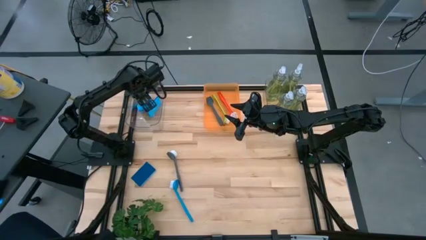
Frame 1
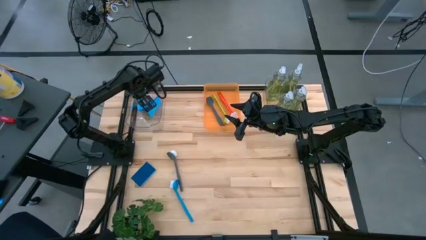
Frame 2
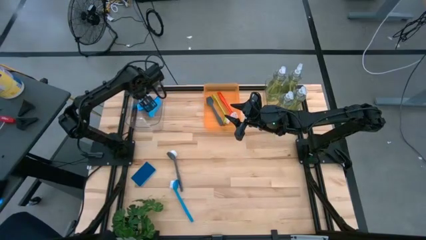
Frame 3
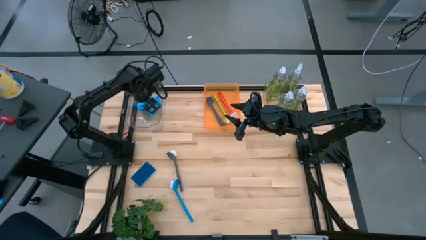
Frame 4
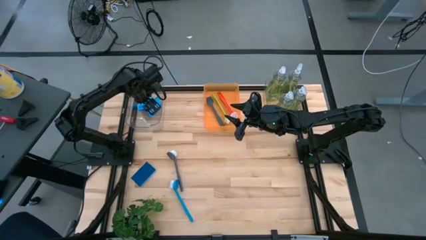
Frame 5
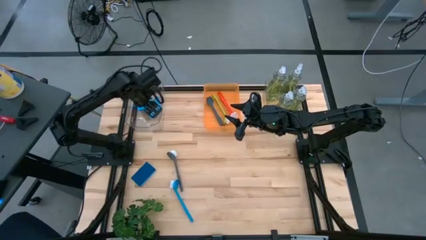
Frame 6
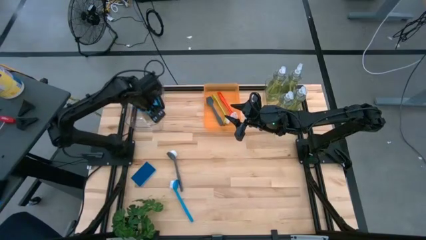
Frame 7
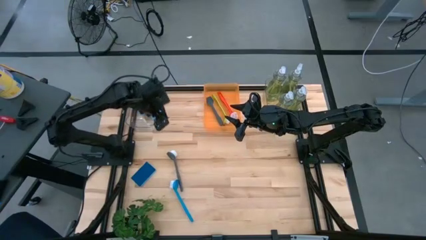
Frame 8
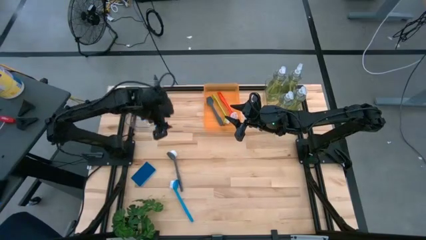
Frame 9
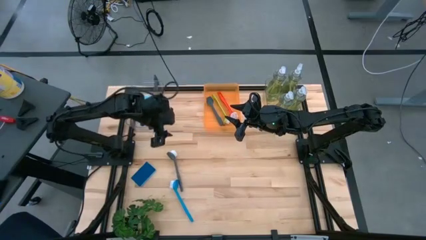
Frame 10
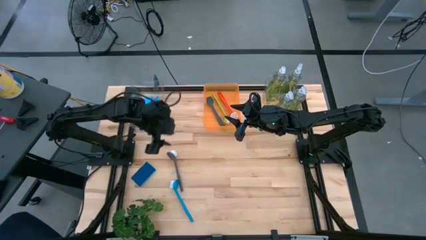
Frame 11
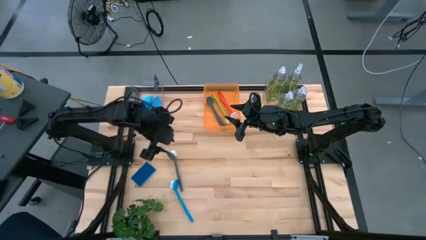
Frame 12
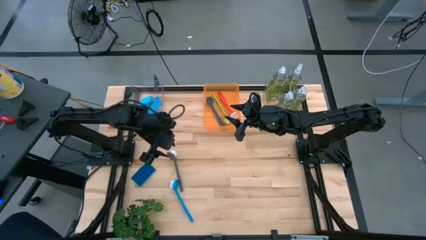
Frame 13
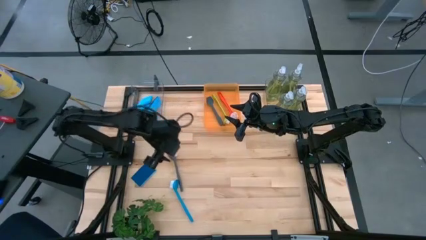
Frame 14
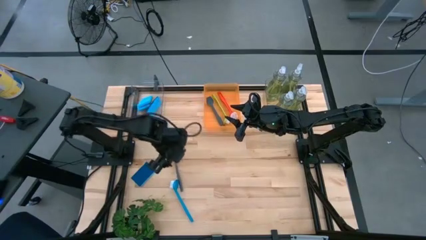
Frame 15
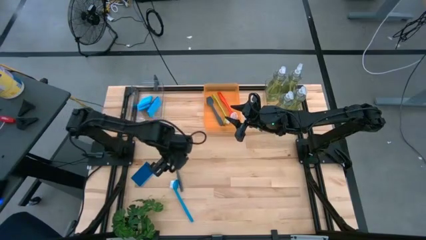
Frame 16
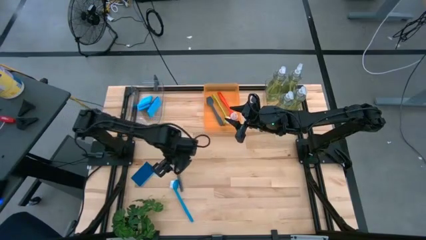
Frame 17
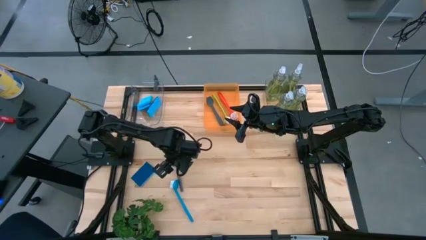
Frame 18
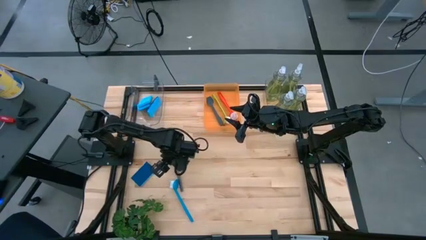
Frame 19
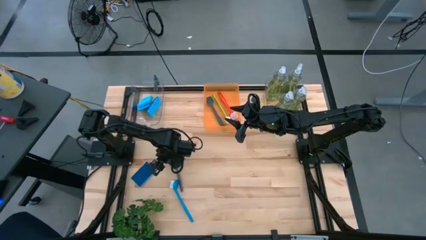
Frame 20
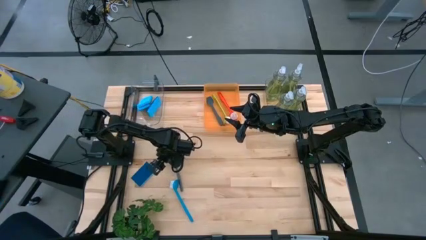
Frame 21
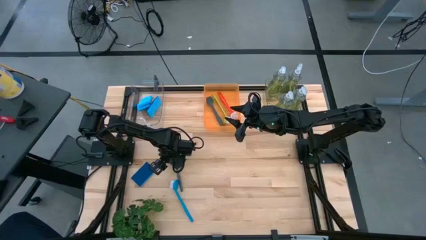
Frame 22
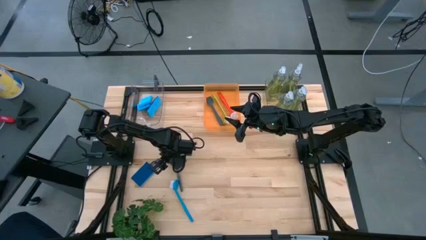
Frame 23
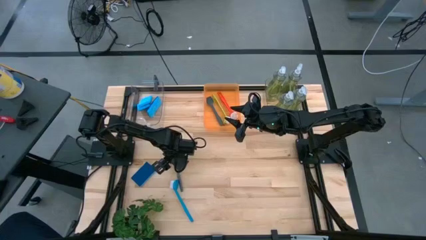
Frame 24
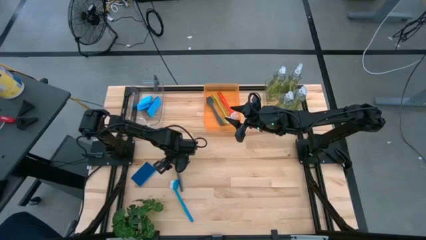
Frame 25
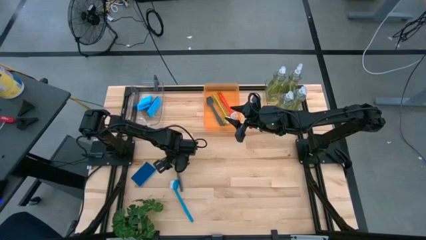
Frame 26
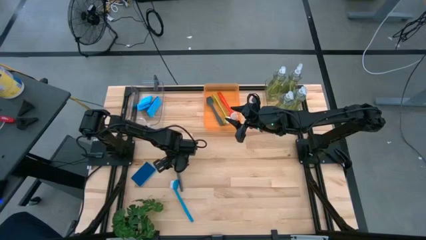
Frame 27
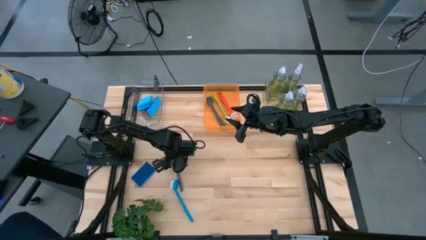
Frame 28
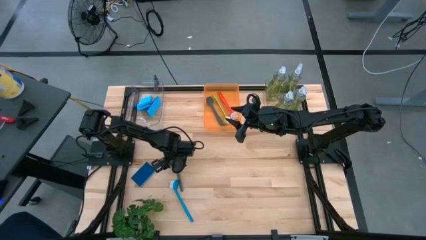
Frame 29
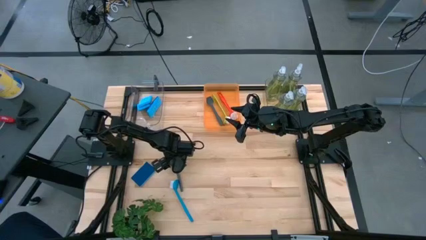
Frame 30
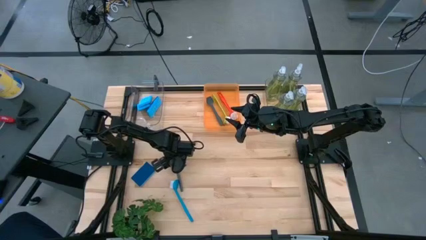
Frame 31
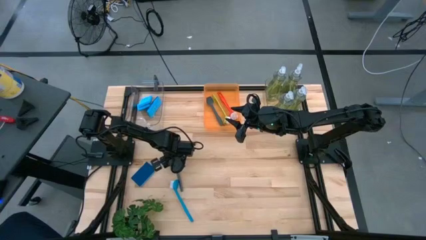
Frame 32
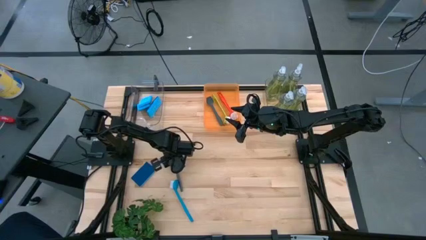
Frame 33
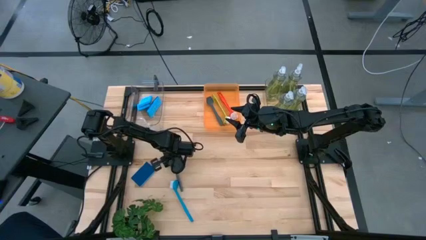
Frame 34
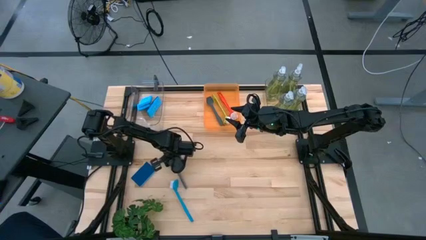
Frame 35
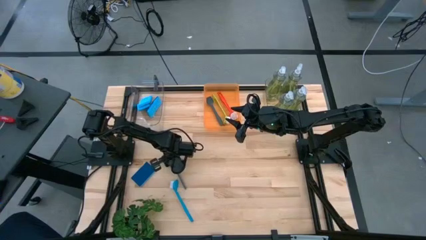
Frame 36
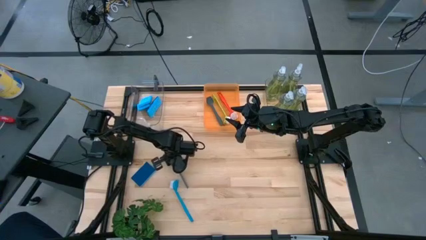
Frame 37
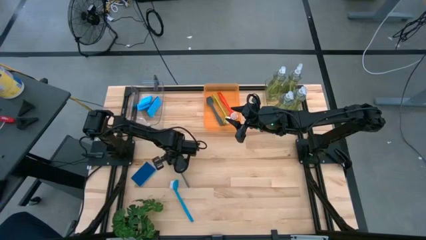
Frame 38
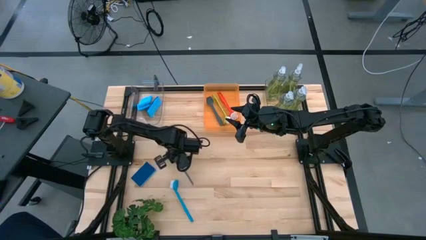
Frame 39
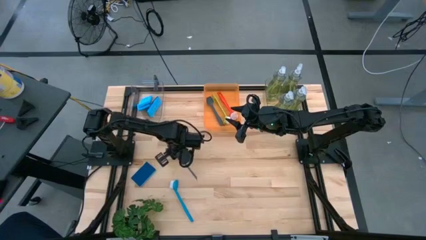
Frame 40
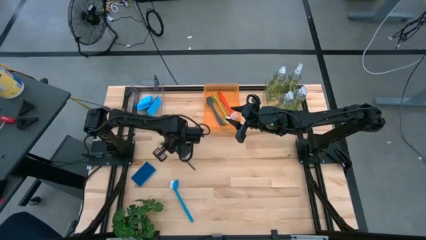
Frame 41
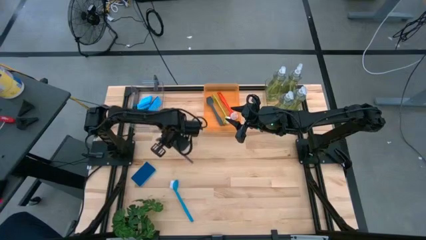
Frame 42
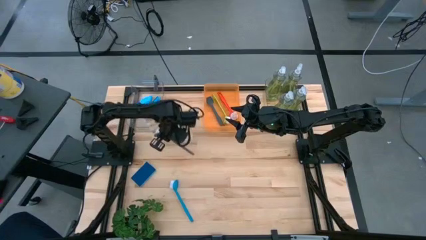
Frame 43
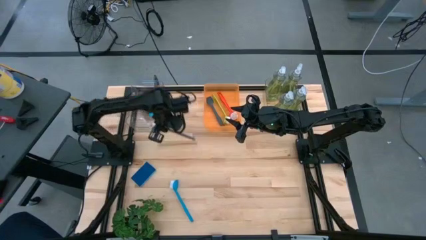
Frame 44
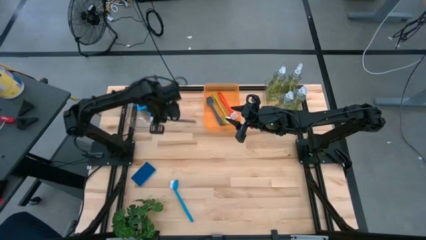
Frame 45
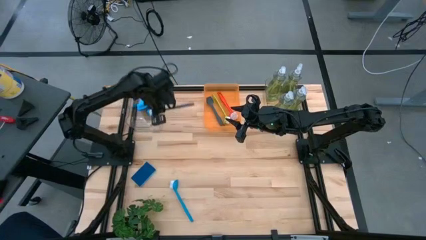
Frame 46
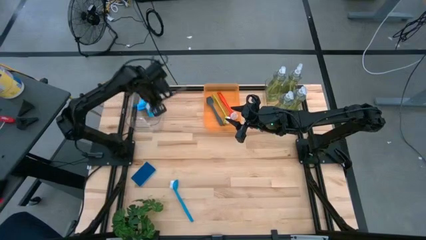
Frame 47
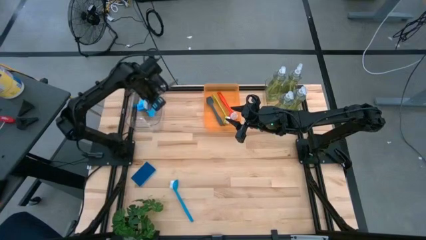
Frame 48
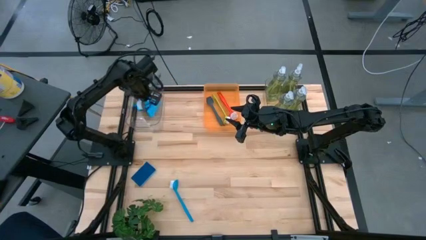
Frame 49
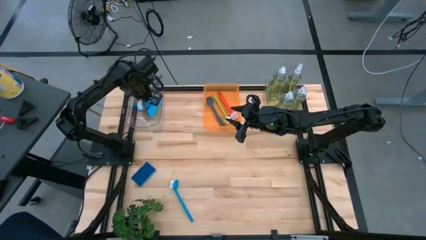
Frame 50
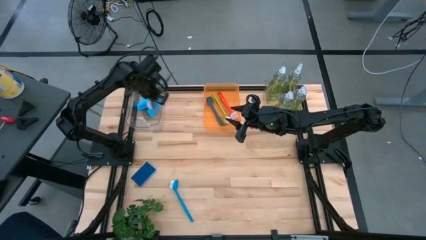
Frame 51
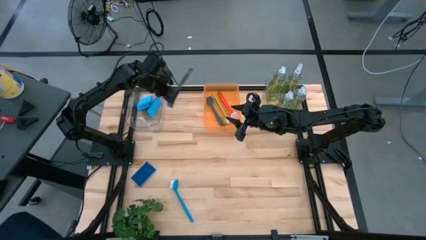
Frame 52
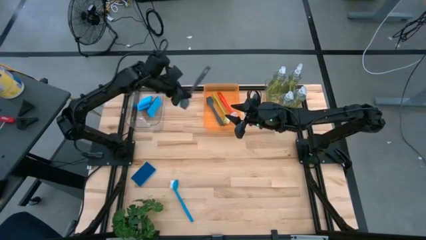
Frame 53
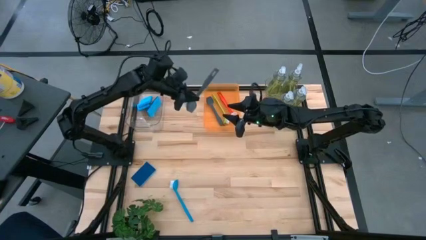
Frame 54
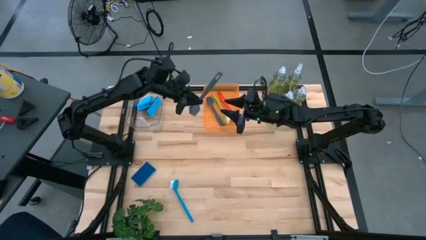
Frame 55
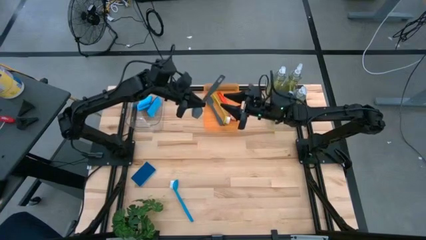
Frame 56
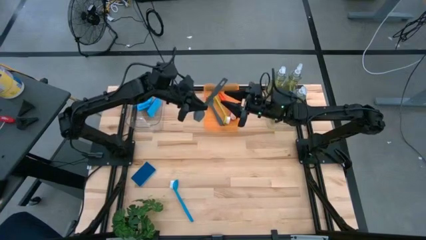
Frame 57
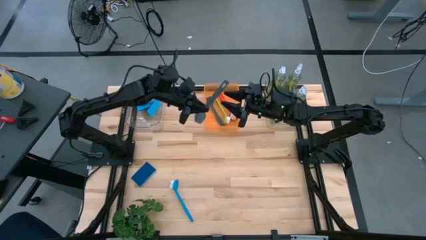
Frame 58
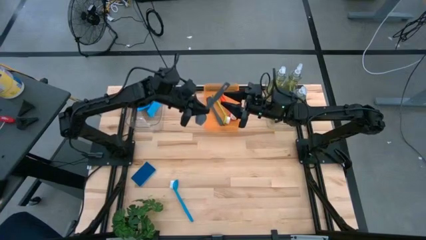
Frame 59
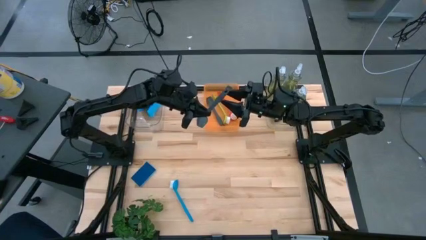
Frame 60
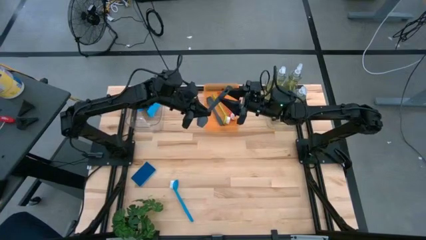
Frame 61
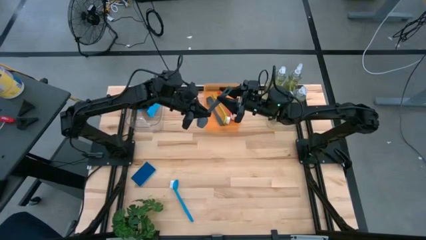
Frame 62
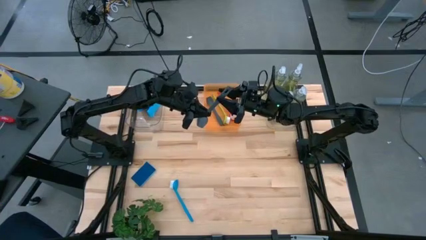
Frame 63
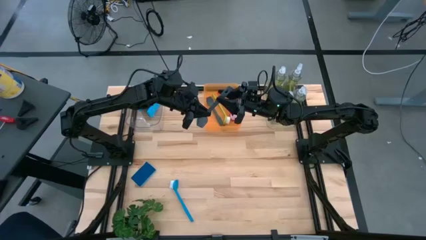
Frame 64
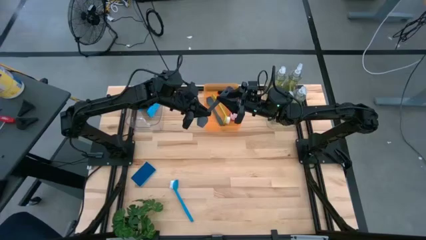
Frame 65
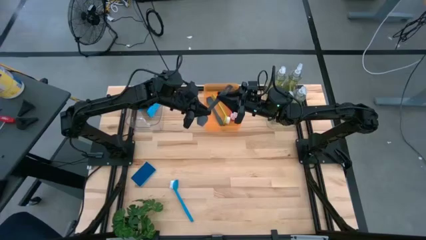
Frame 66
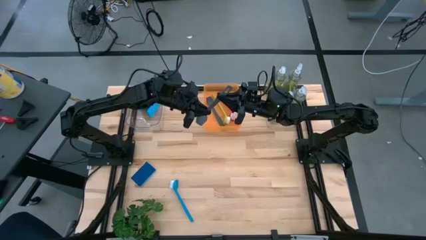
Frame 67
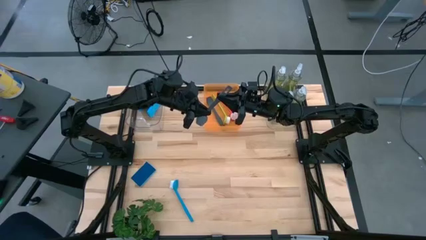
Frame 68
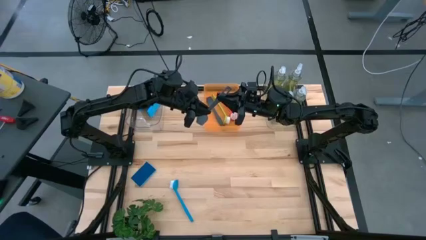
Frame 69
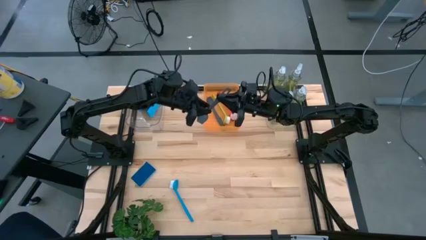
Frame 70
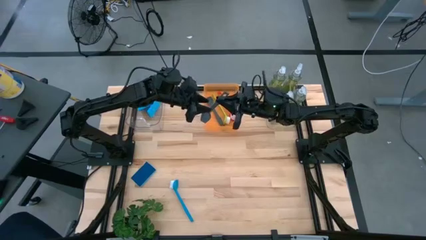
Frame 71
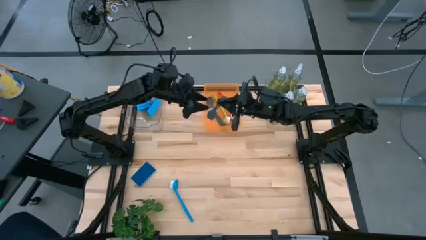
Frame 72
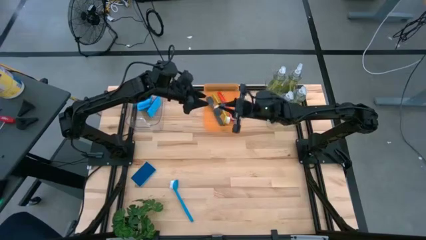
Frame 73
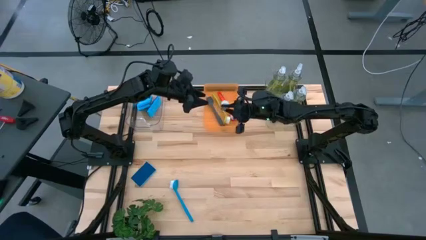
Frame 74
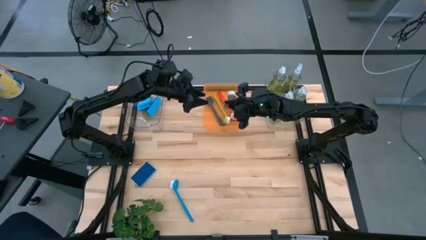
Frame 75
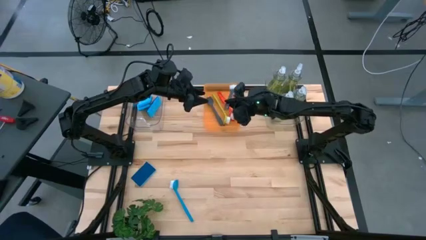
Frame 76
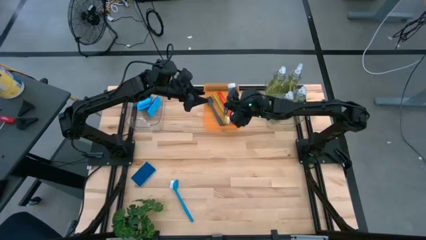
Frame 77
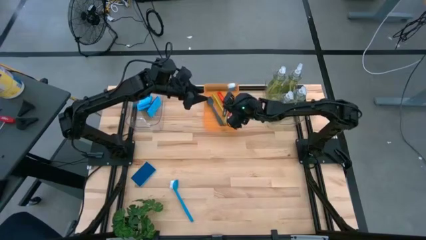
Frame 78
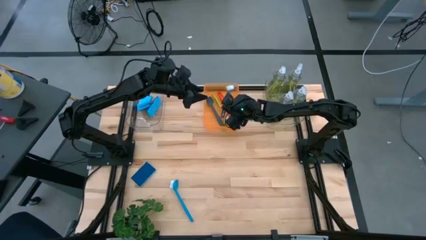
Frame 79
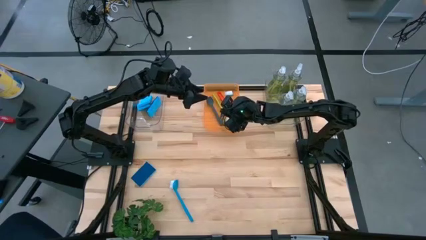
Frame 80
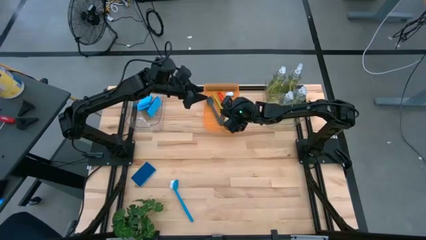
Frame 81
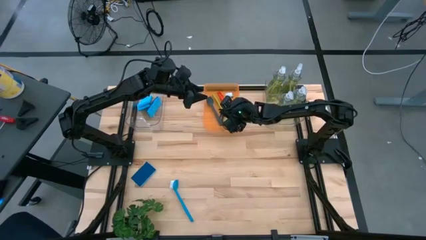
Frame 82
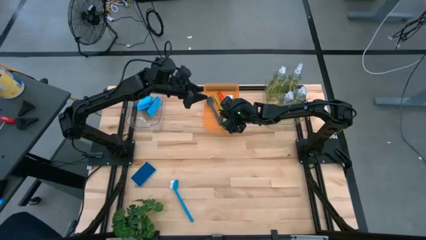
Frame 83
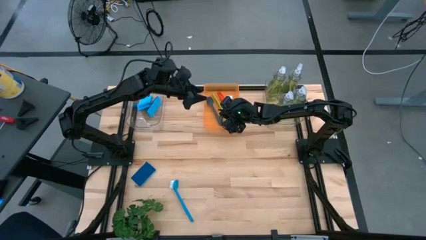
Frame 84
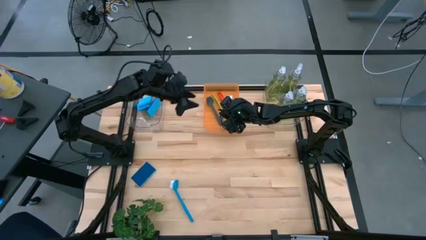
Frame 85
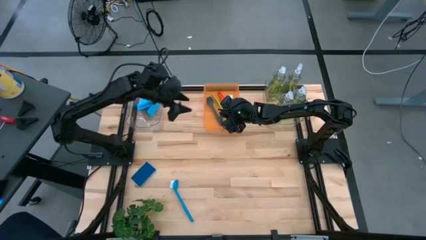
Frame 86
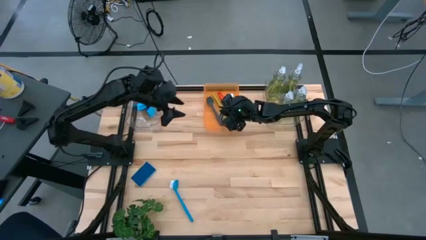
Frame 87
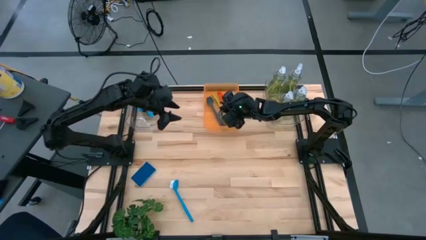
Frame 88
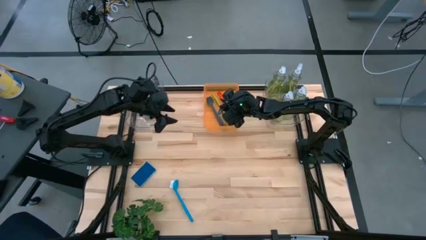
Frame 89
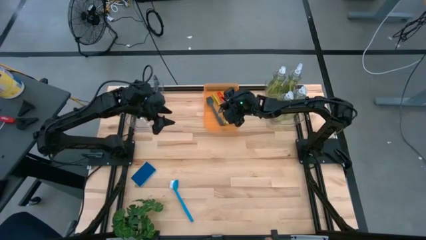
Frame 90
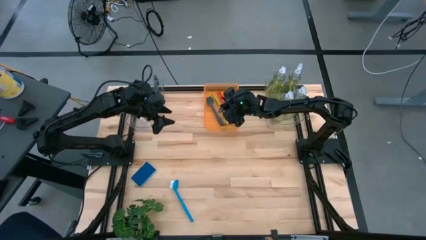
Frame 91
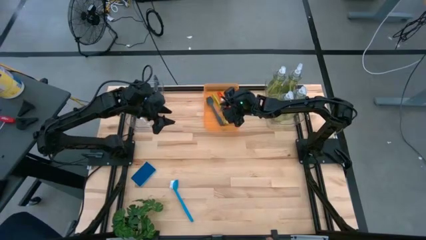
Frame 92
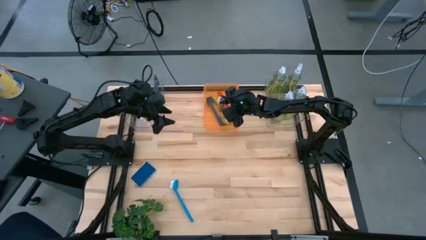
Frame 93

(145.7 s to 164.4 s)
Task: Pick & Place Kitchen Sink Supplies
Put the gray dish brush into the orange bin
